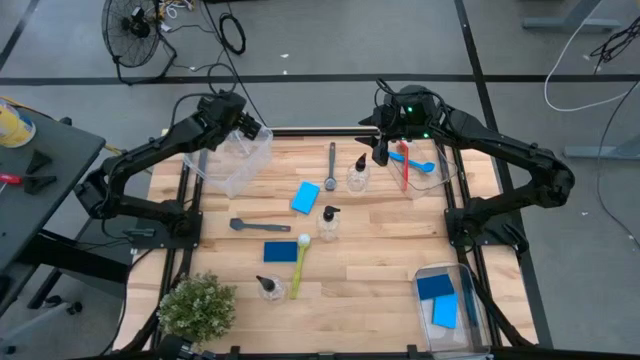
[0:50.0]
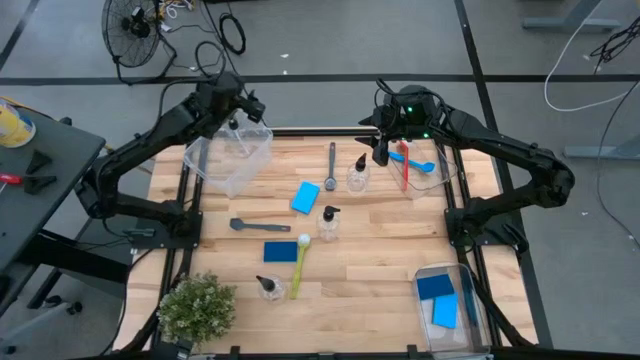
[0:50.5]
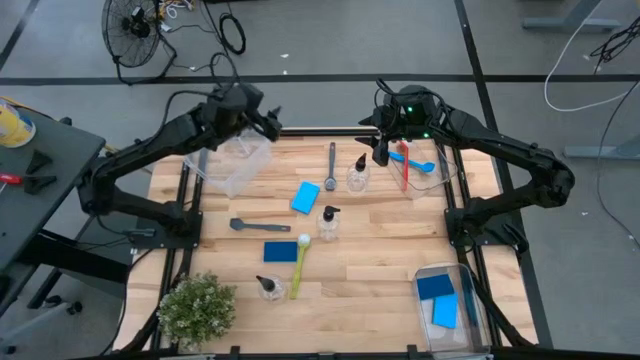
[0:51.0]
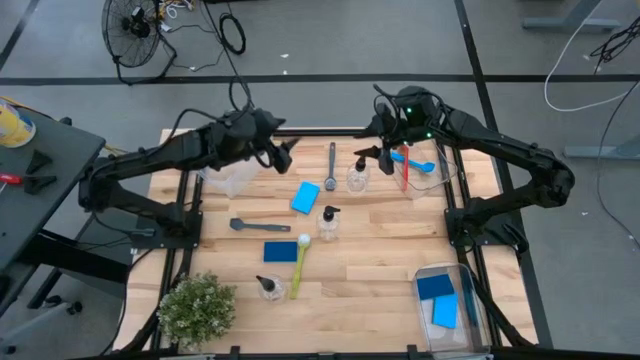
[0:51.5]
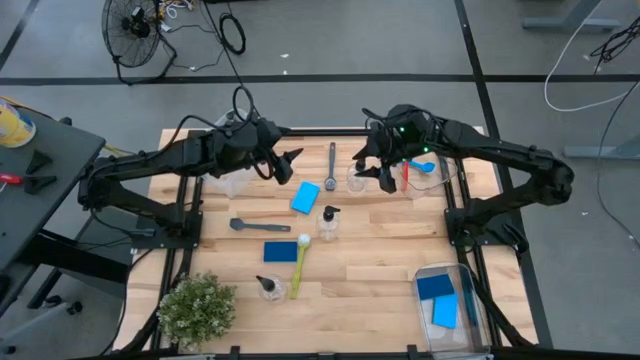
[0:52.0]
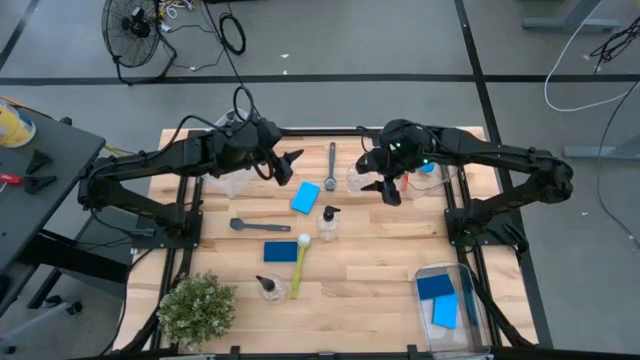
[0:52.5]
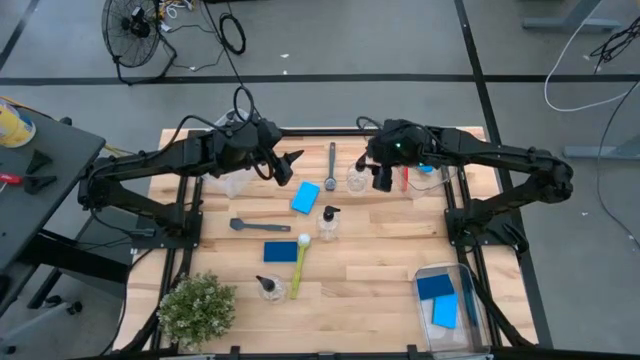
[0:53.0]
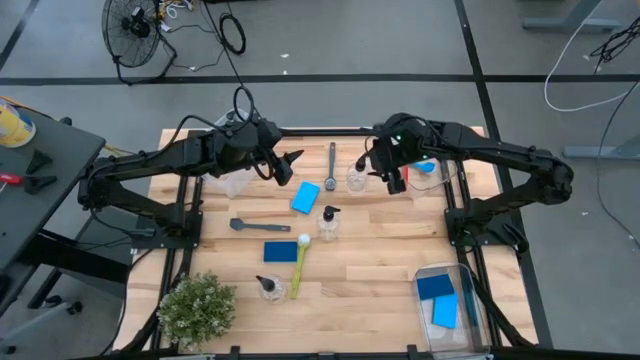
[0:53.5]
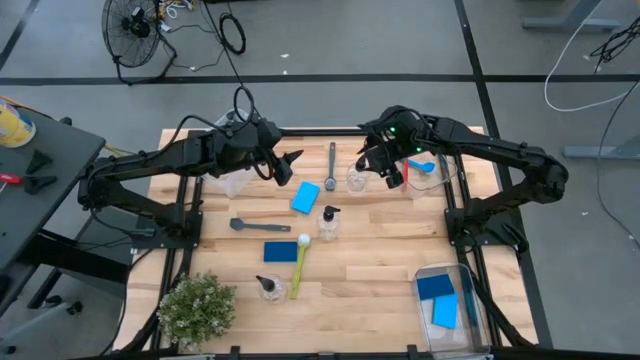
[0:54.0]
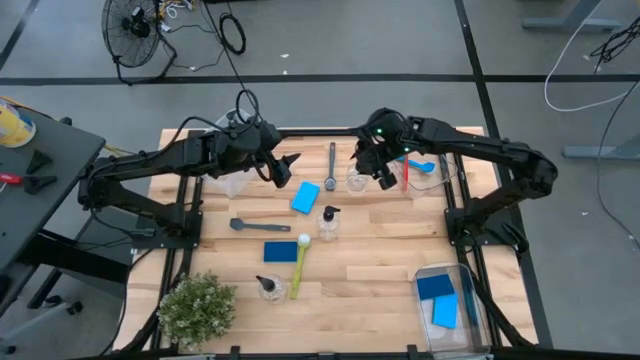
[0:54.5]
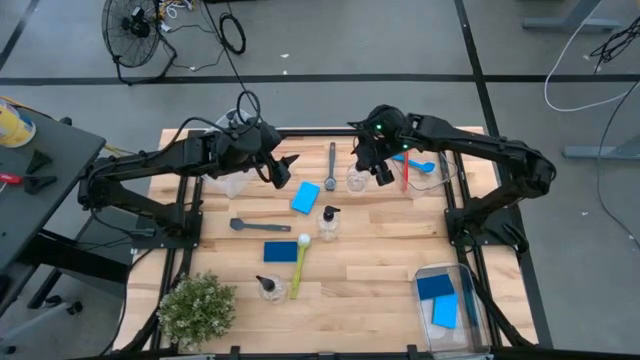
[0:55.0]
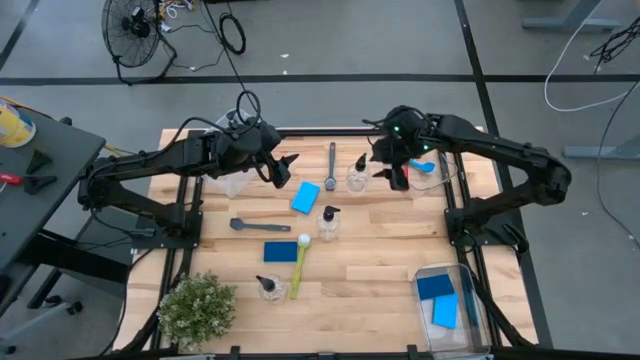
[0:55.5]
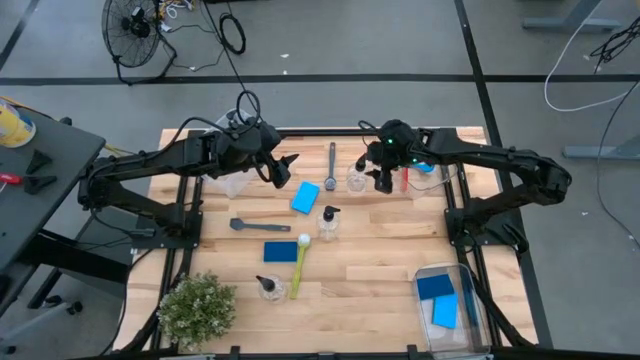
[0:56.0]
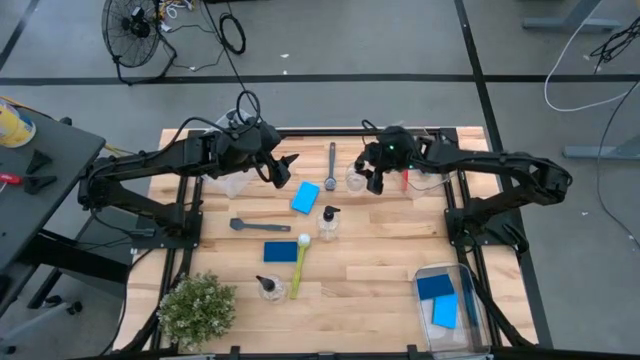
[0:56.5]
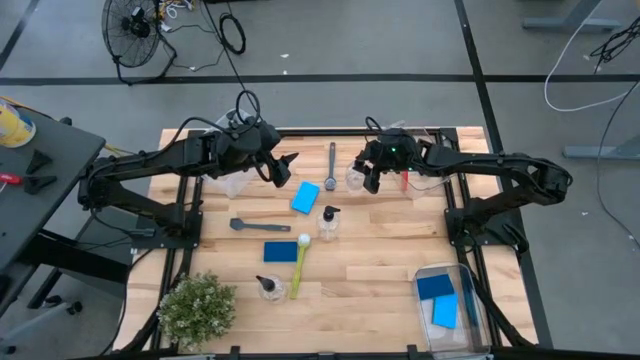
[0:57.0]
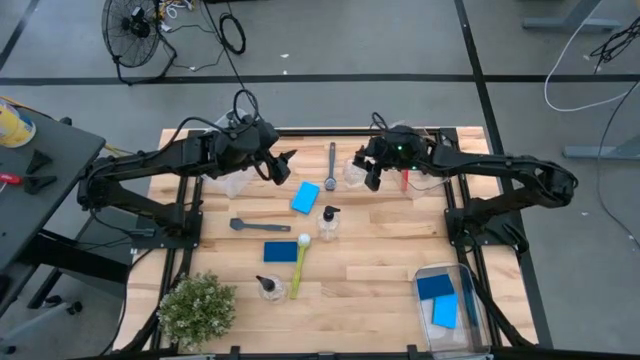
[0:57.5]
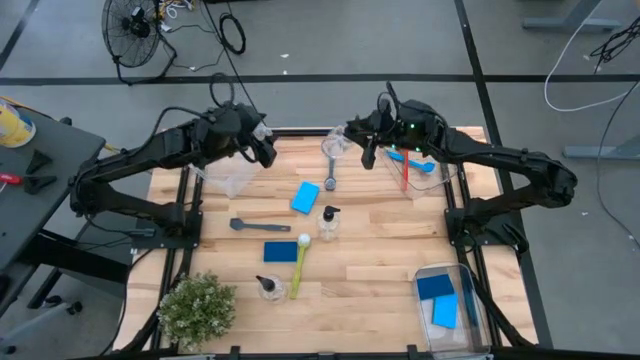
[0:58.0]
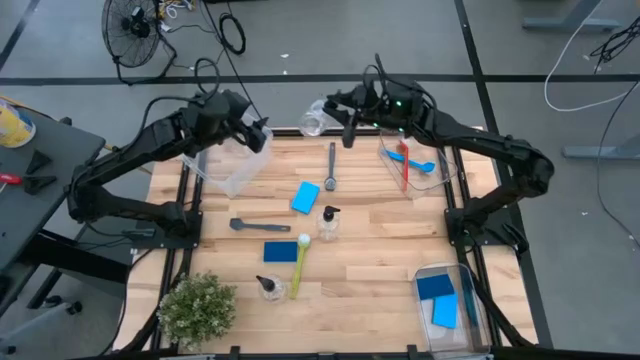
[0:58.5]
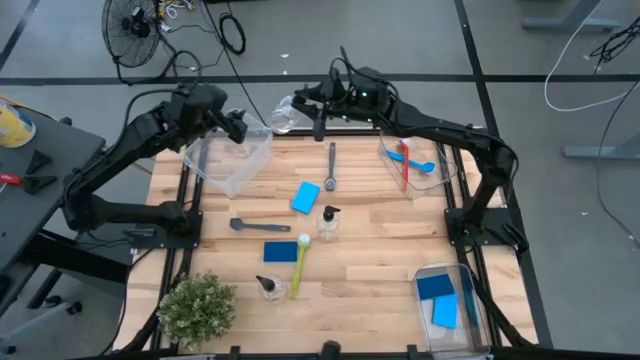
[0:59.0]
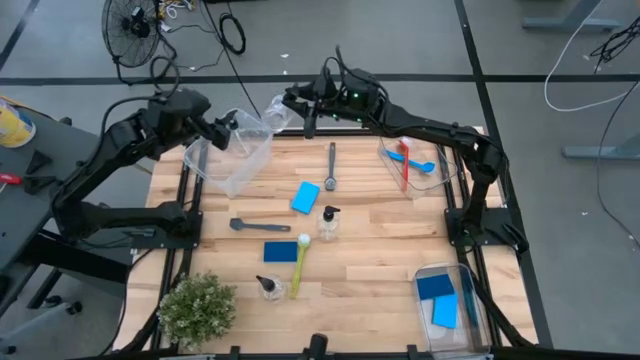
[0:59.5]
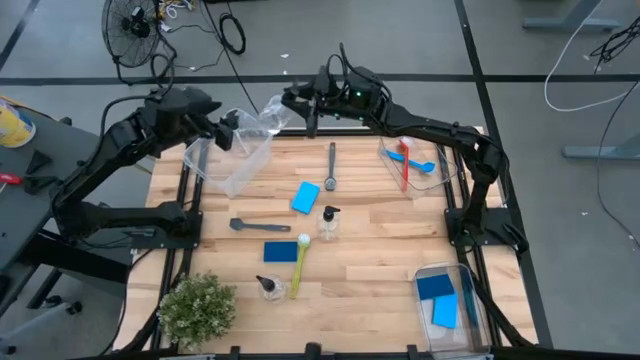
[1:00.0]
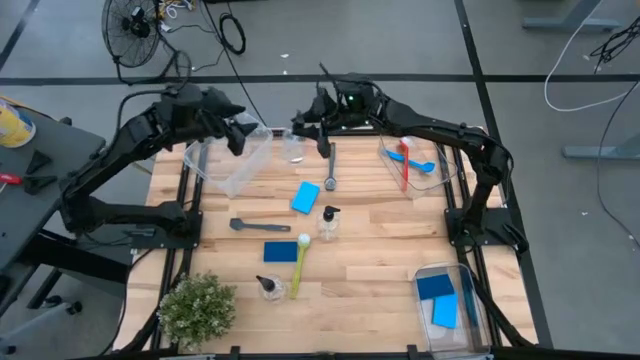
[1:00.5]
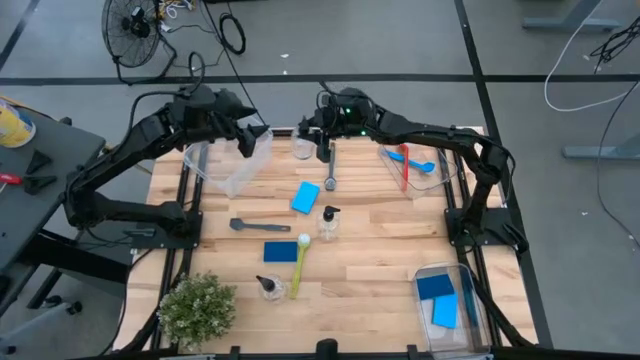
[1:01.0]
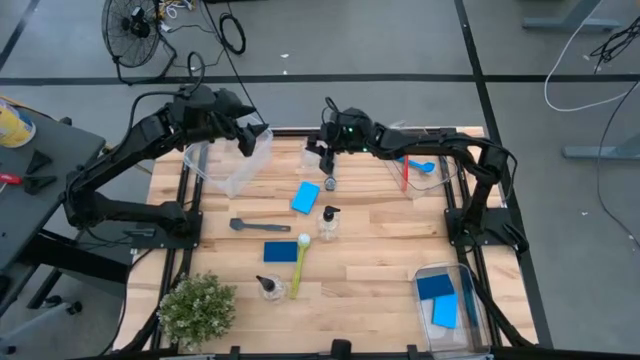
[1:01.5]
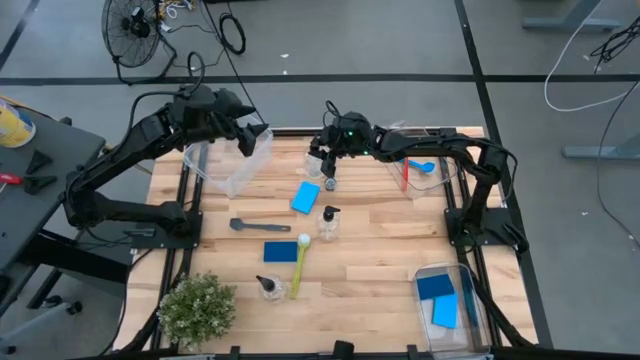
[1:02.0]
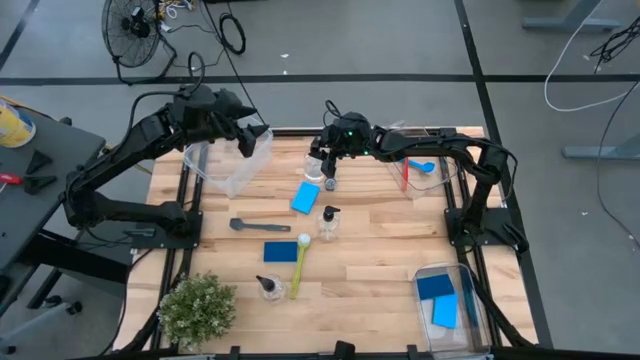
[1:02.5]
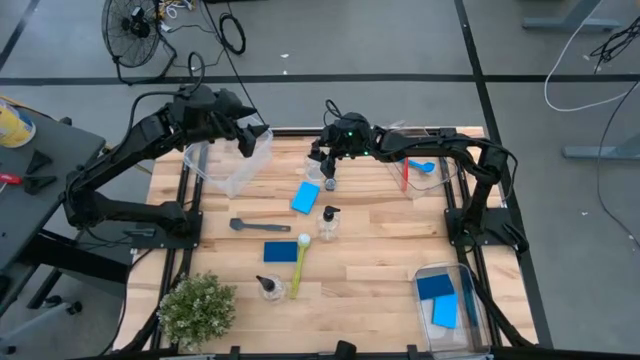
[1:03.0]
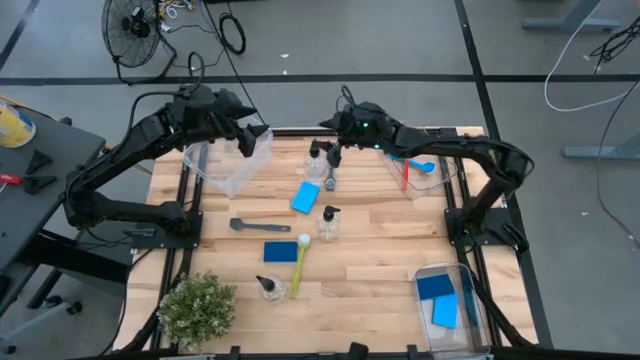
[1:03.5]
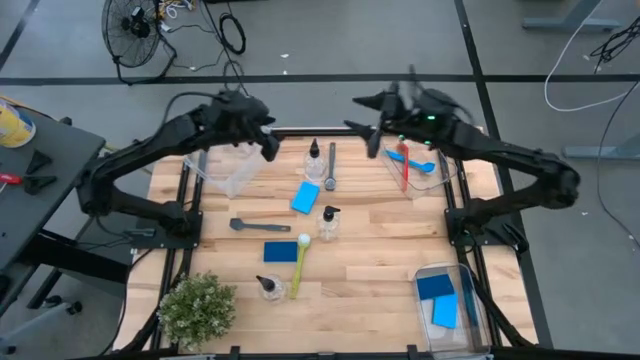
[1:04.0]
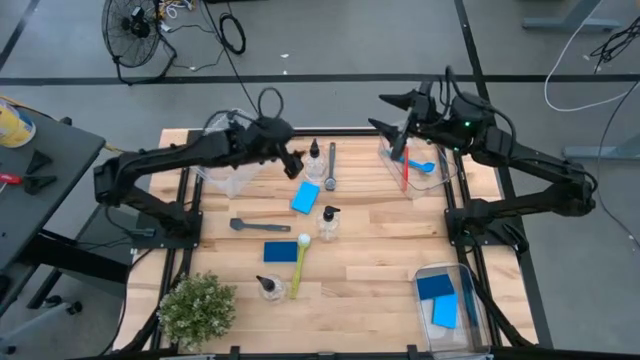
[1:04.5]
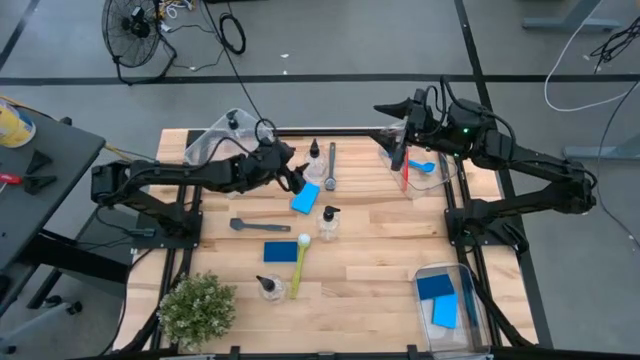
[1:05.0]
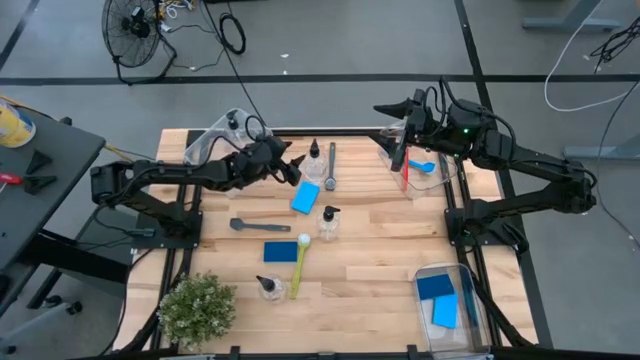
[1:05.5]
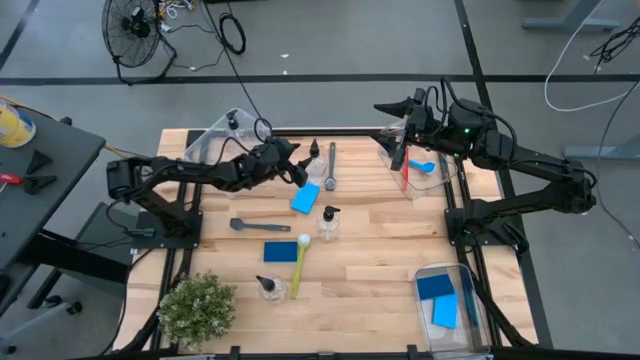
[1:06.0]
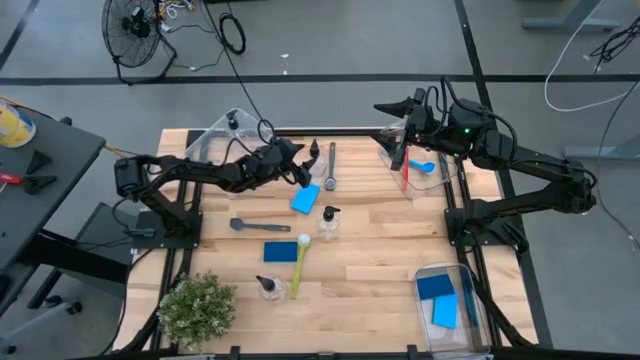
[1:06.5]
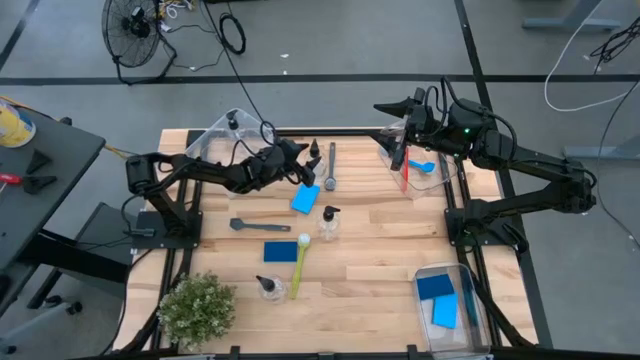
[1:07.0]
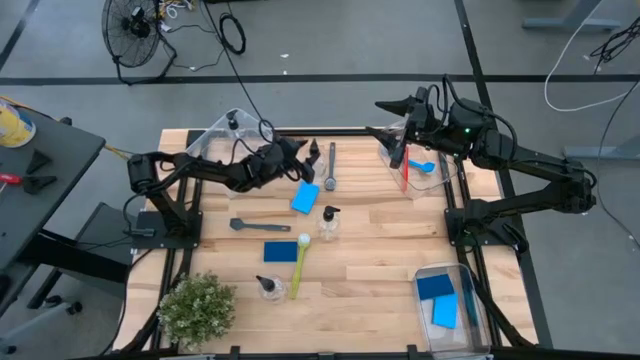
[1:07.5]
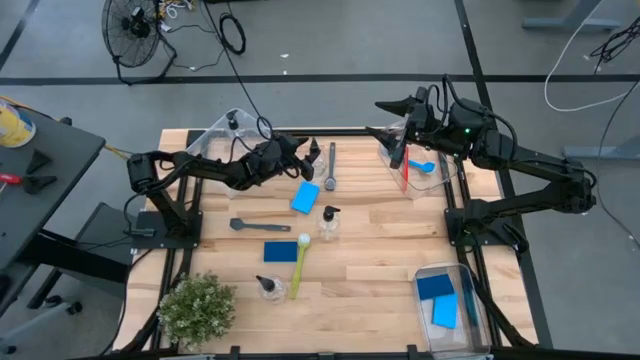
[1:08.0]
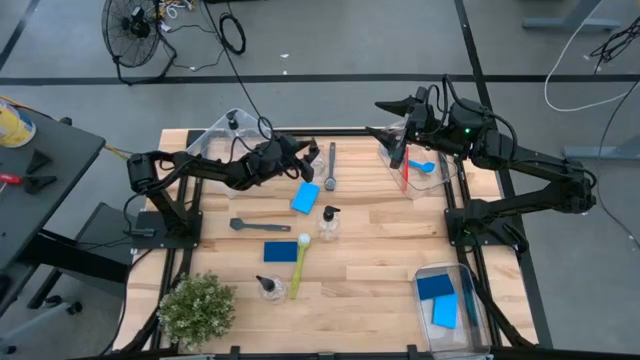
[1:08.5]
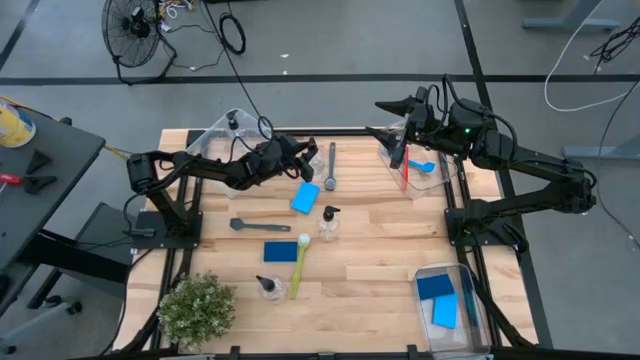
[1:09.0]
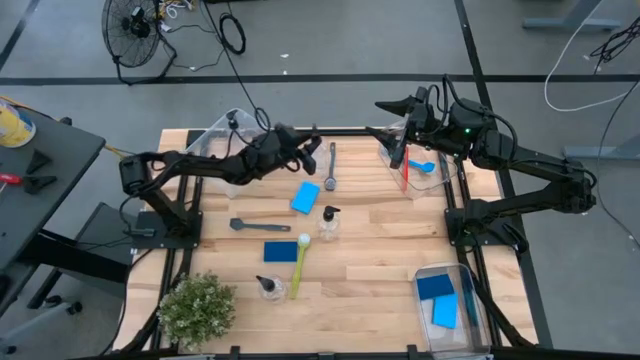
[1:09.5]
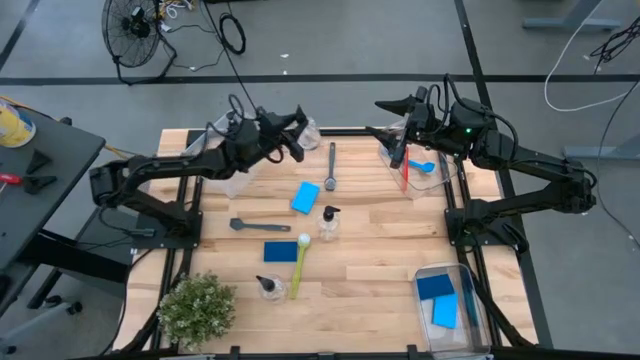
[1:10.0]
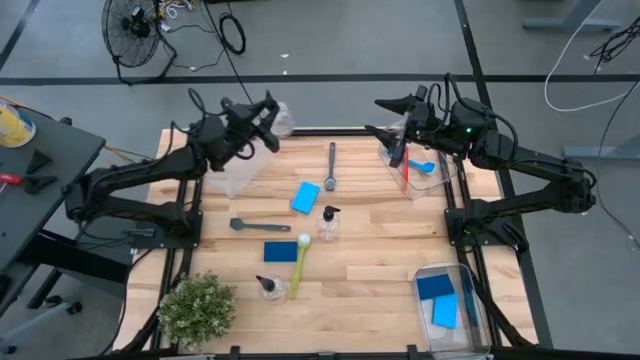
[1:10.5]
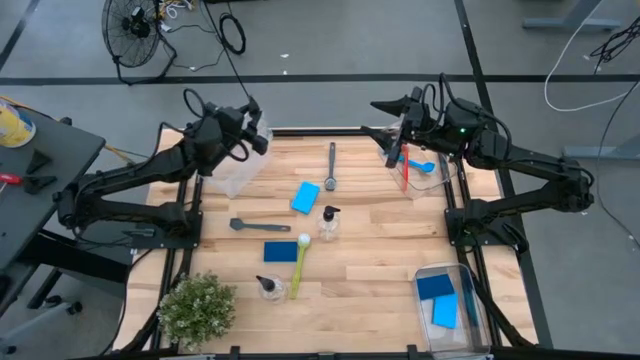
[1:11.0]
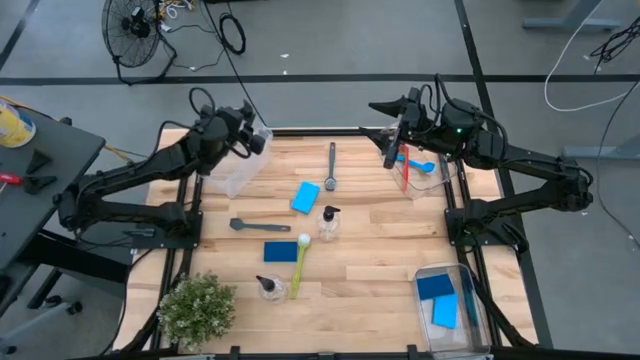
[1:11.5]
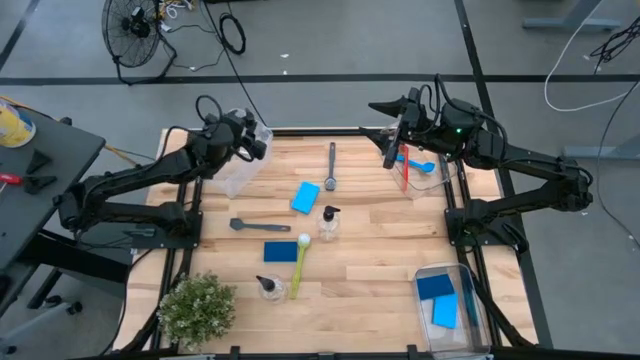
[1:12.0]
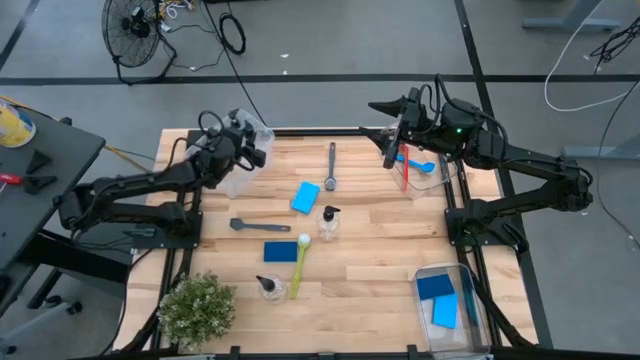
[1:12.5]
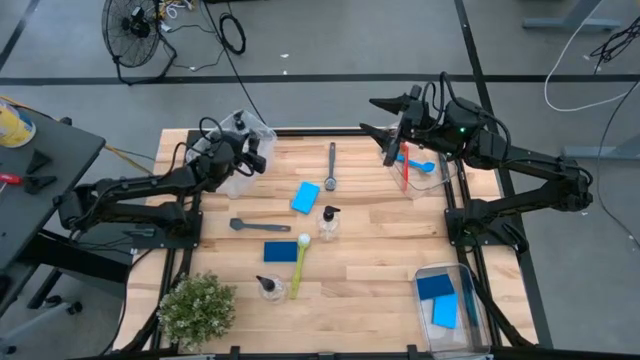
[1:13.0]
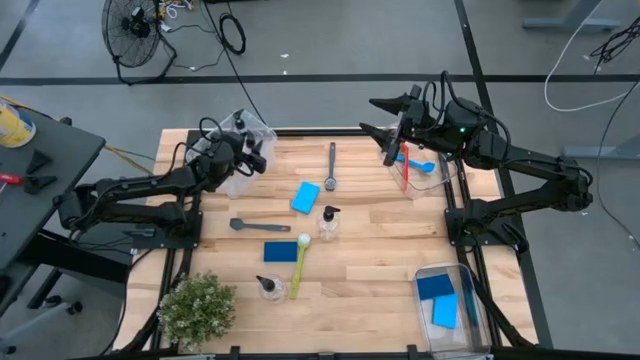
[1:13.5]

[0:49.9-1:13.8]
Task: Pick & Place Kitchen Sink Supplies
Put the transparent bottle spray into the transparent container
